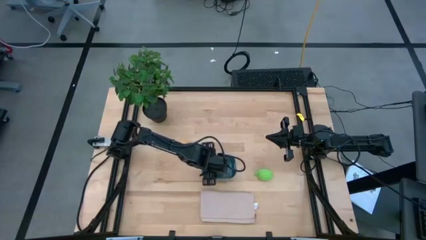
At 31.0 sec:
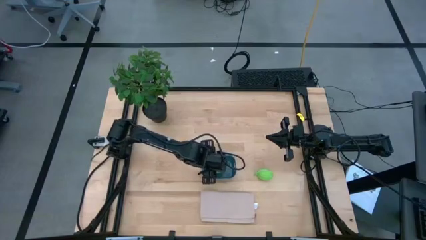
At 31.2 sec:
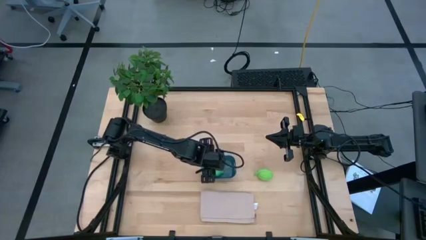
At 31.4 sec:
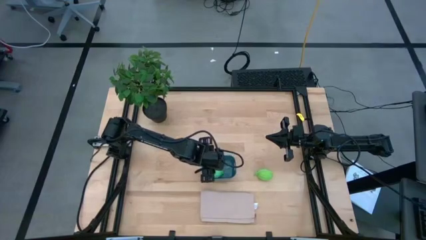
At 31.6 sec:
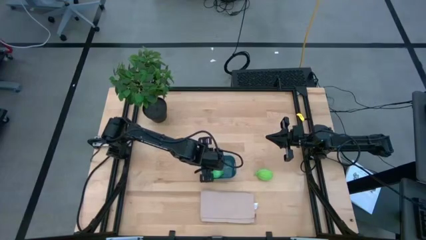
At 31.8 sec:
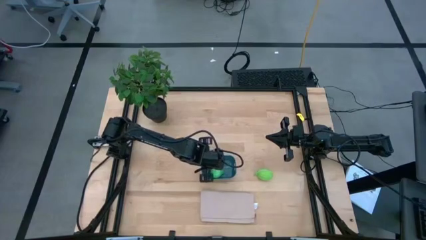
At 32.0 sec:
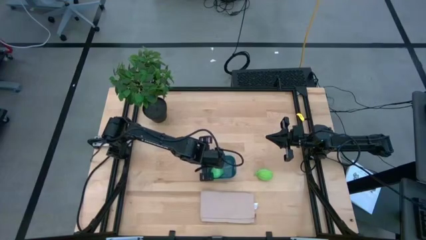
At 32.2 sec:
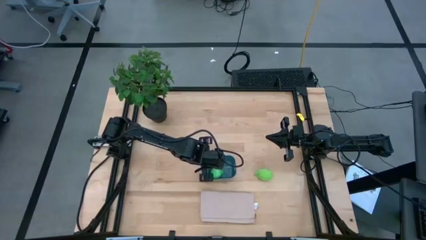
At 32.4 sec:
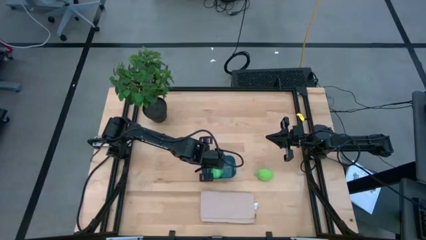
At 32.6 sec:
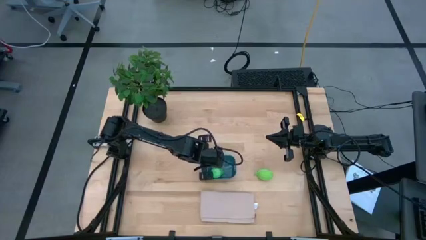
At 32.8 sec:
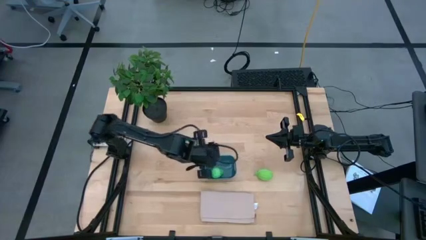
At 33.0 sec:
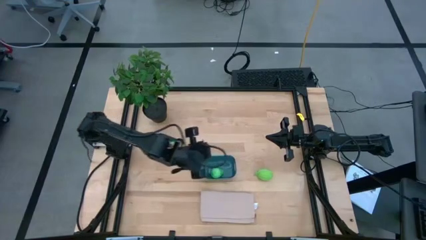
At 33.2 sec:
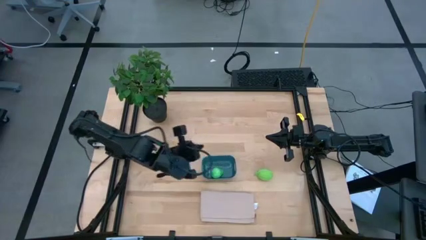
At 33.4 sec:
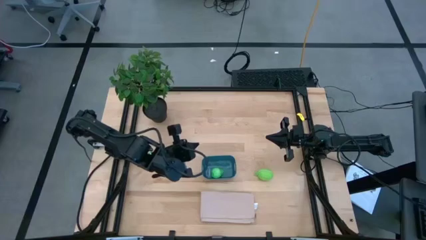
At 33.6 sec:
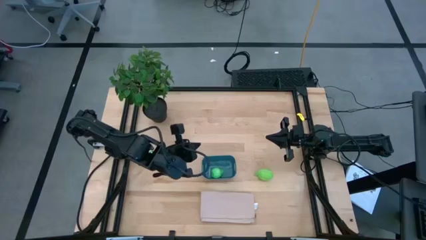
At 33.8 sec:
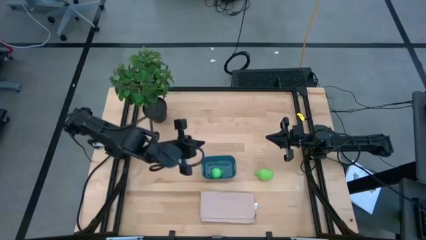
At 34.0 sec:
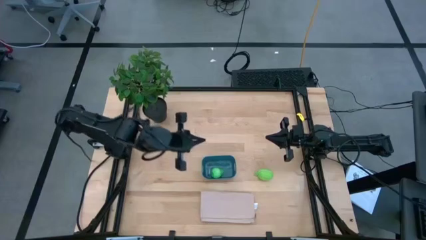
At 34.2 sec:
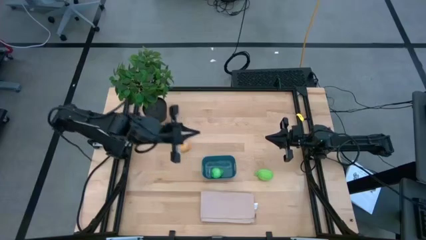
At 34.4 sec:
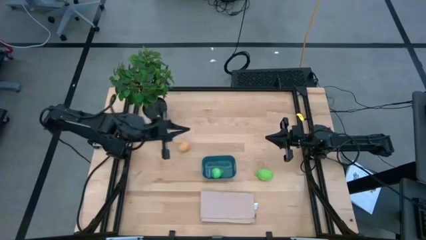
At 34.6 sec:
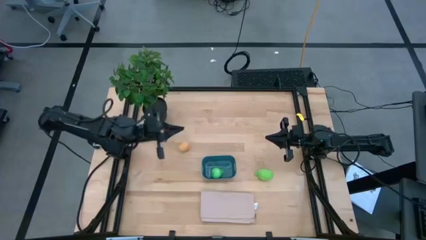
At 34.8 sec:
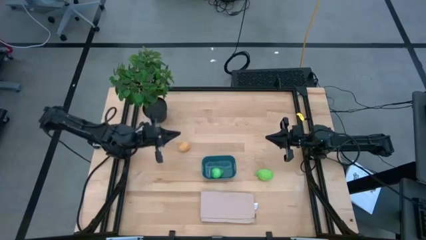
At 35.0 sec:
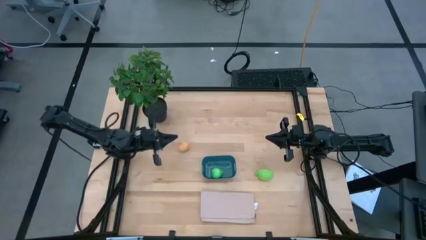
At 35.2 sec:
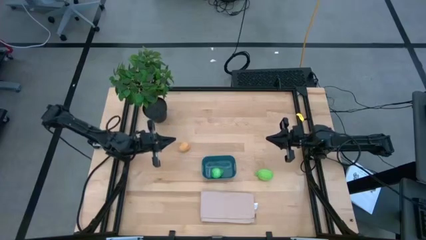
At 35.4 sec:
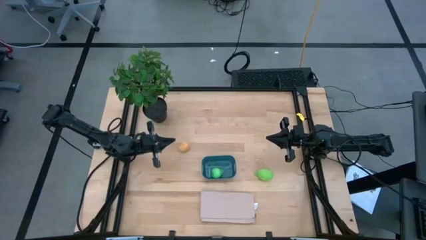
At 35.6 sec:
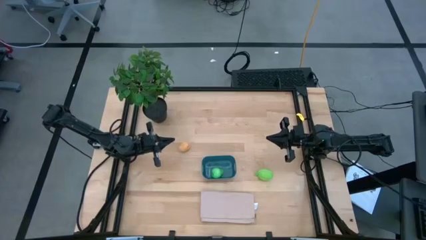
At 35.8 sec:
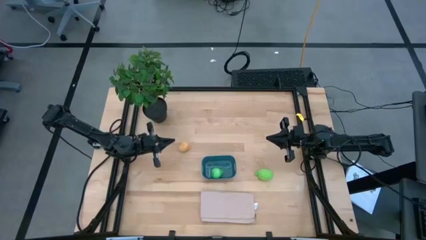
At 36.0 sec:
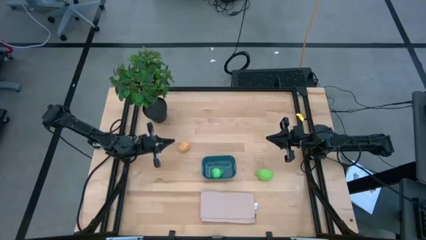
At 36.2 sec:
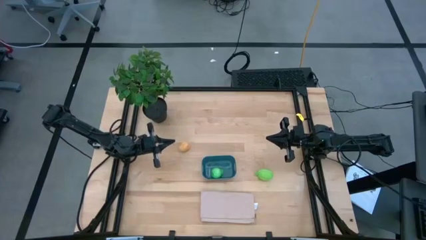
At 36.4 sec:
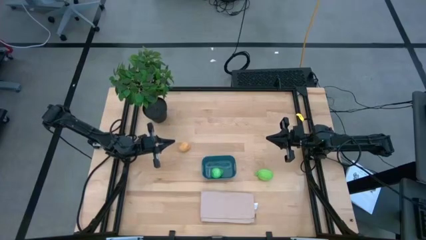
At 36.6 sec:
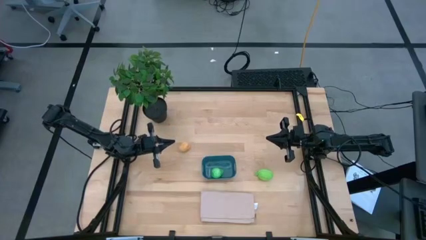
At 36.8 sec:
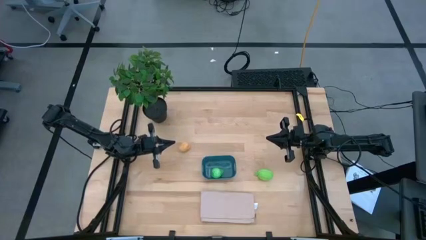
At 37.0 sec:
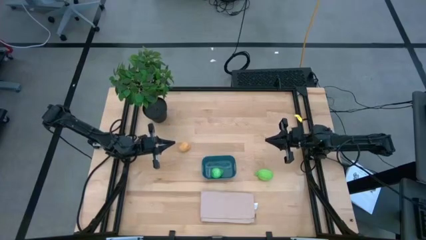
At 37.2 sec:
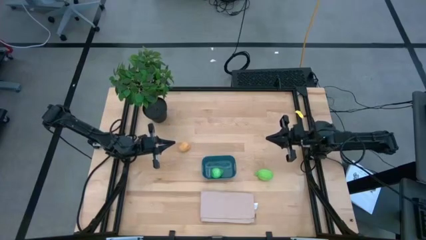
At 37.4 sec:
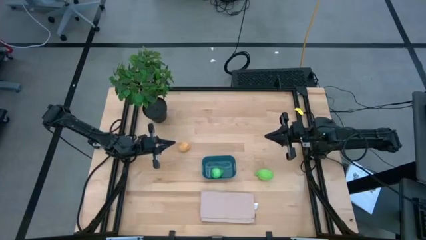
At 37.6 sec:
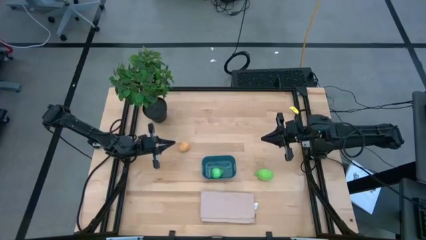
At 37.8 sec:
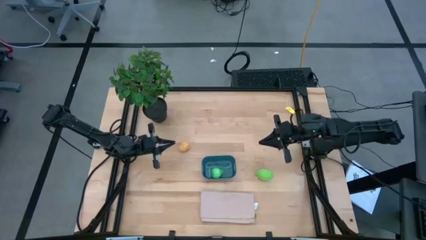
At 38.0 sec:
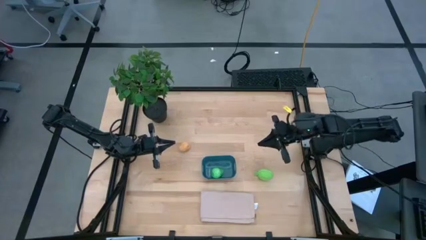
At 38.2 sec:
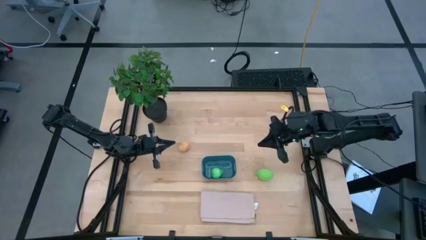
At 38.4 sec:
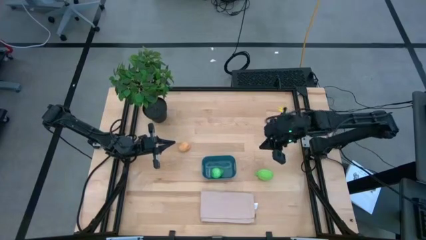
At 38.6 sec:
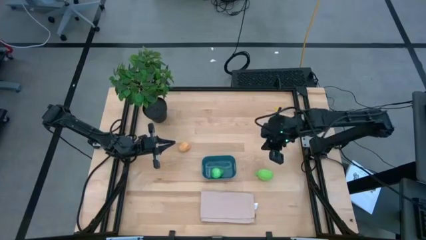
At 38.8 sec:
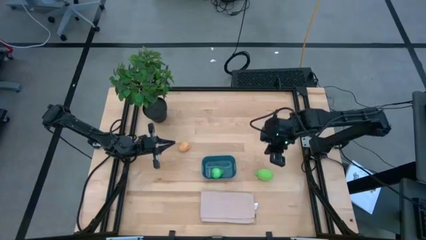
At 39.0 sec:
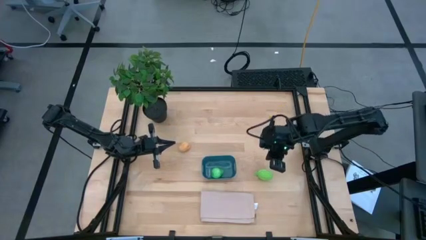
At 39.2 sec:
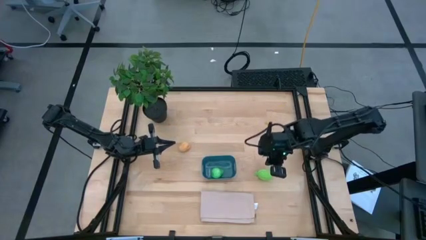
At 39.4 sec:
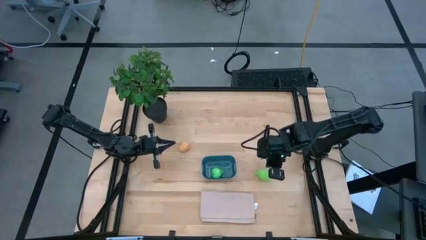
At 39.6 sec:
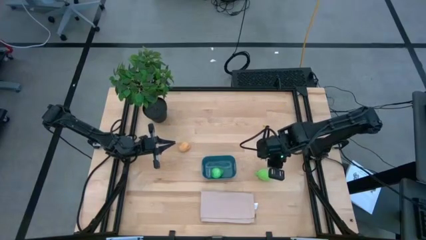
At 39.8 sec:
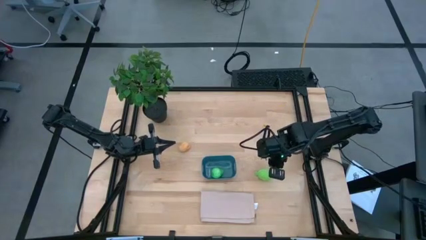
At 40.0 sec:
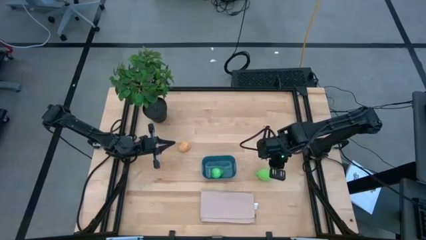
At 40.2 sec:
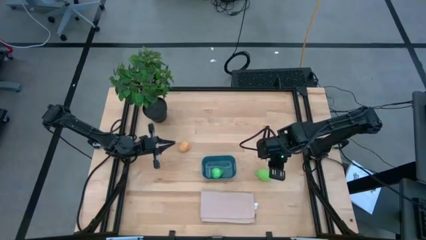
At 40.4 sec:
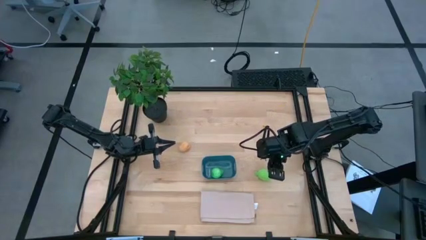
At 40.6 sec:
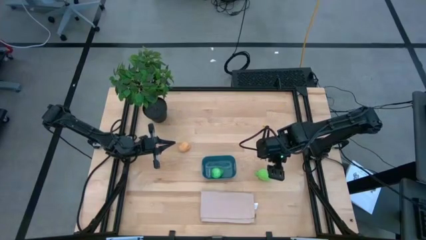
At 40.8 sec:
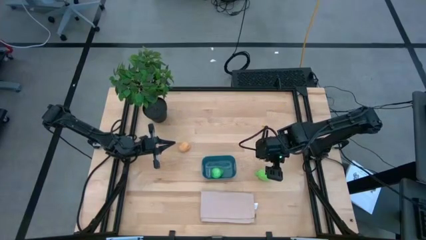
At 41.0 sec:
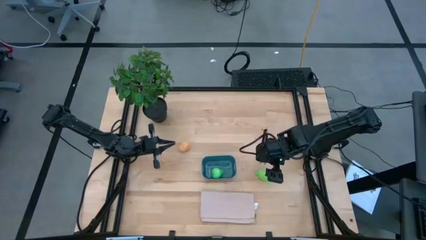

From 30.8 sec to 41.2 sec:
Task: Pick and placing Produce into tupperware
Put the green melon into the blue bin
